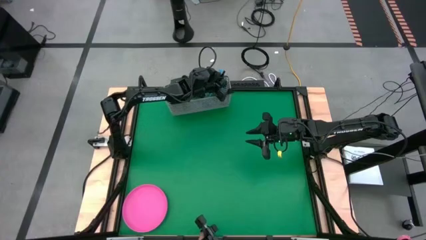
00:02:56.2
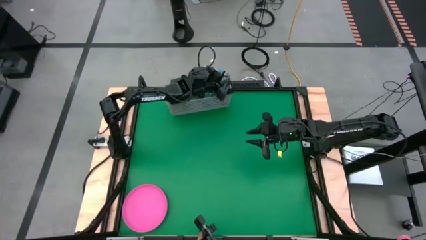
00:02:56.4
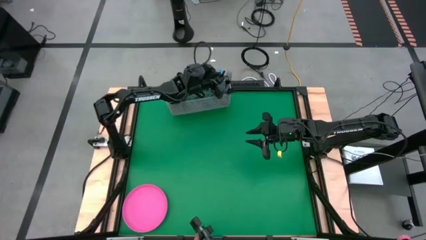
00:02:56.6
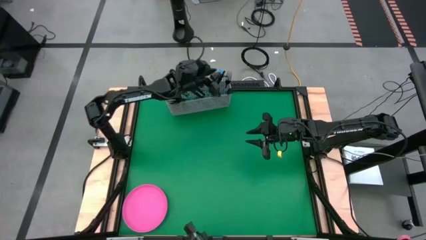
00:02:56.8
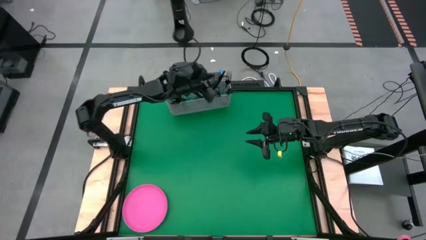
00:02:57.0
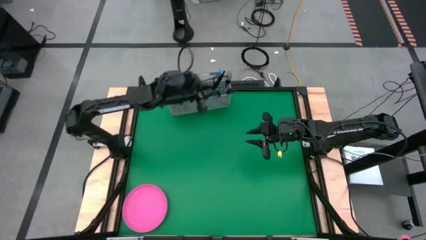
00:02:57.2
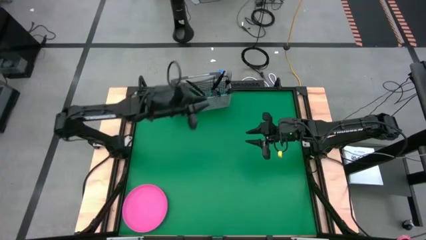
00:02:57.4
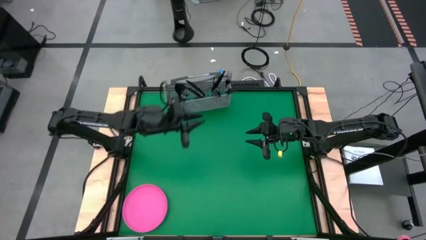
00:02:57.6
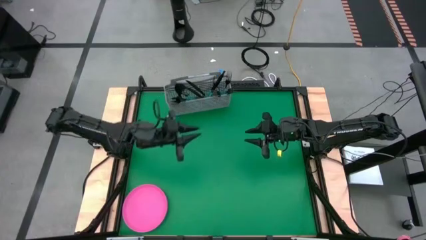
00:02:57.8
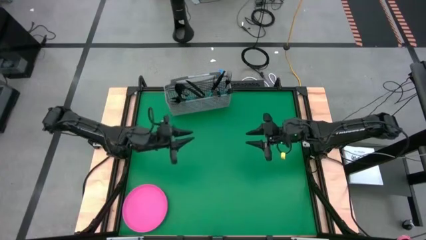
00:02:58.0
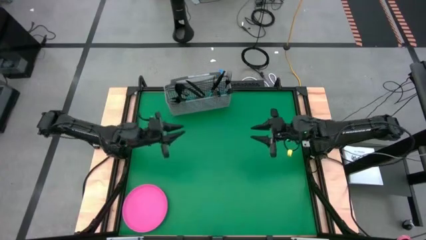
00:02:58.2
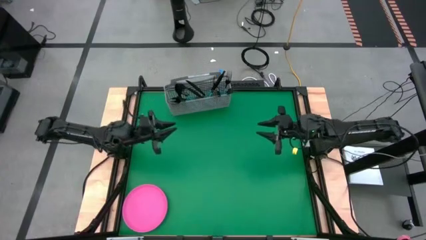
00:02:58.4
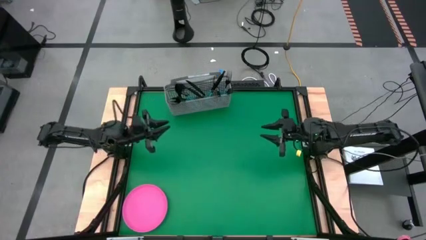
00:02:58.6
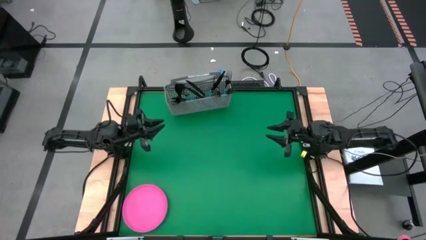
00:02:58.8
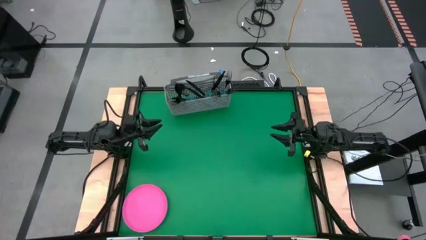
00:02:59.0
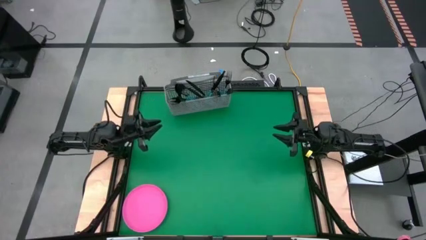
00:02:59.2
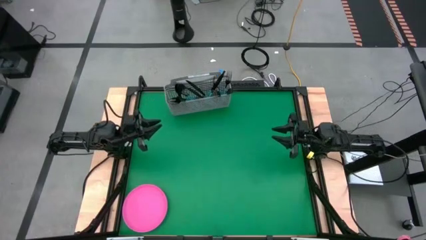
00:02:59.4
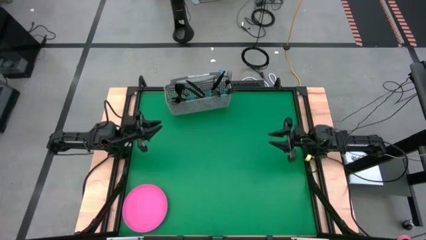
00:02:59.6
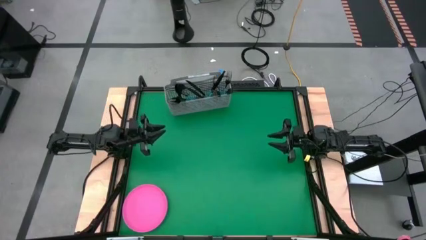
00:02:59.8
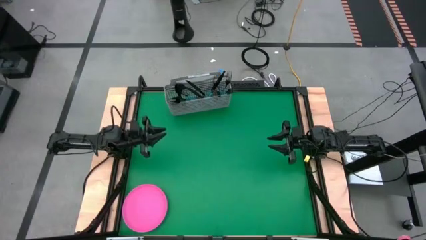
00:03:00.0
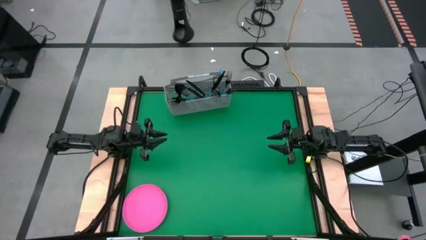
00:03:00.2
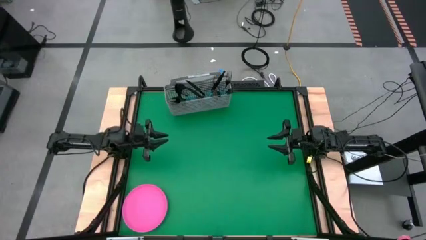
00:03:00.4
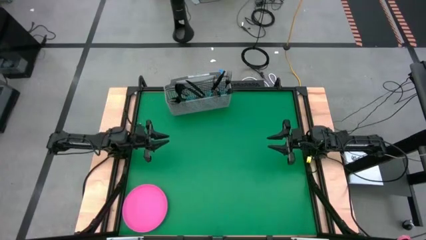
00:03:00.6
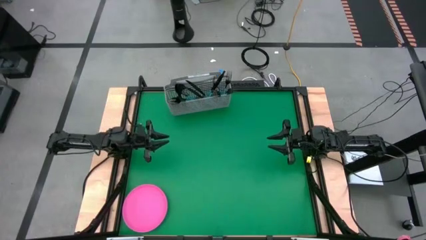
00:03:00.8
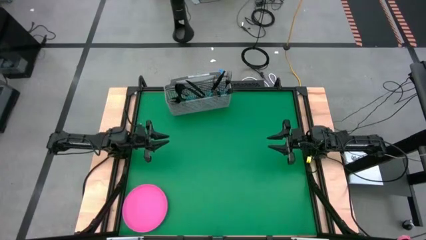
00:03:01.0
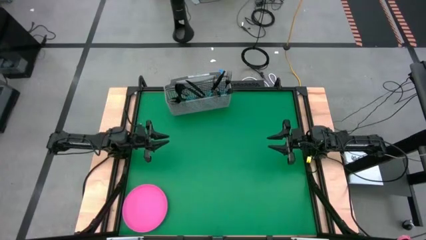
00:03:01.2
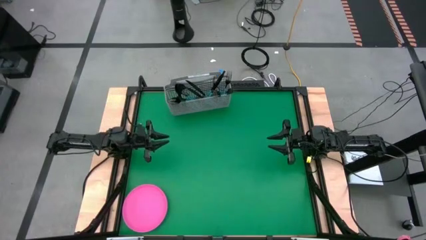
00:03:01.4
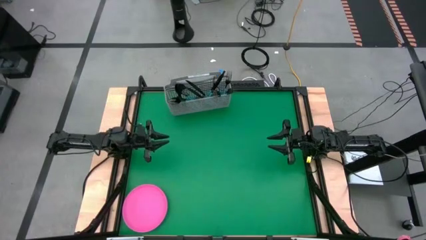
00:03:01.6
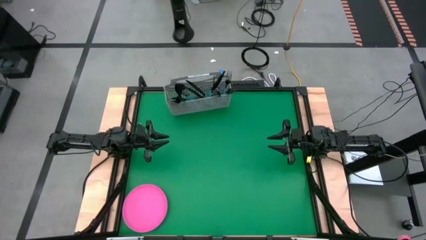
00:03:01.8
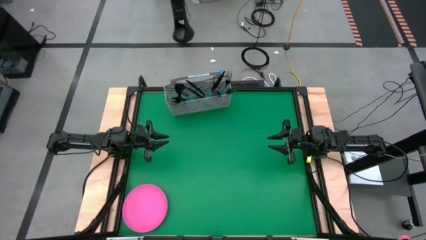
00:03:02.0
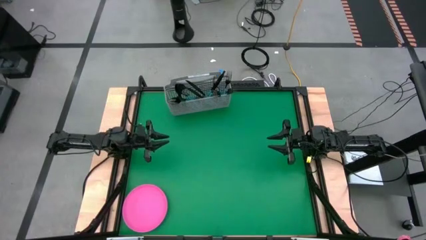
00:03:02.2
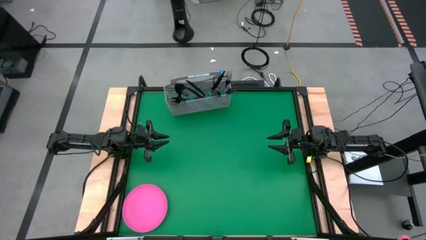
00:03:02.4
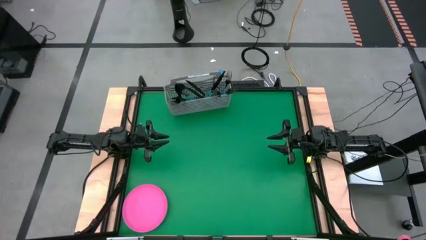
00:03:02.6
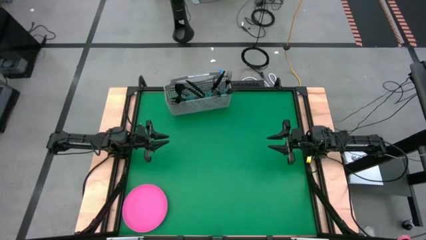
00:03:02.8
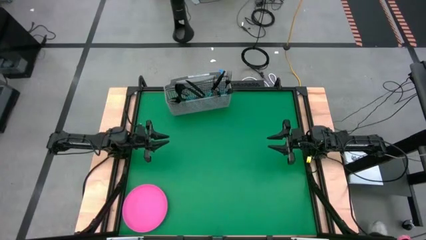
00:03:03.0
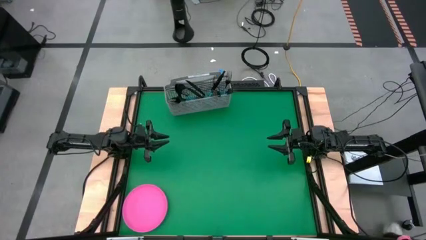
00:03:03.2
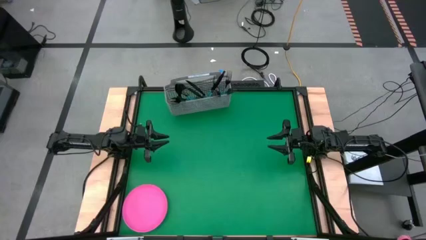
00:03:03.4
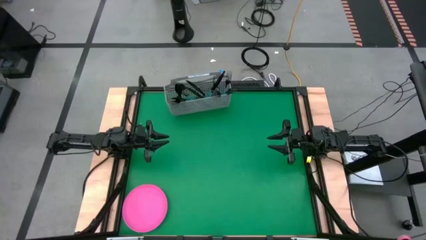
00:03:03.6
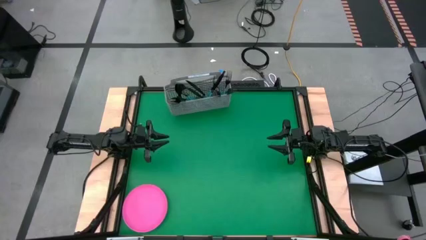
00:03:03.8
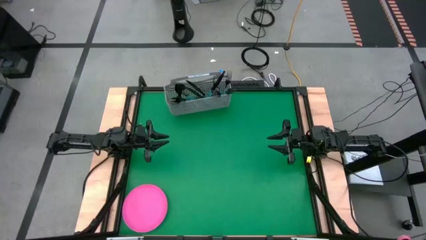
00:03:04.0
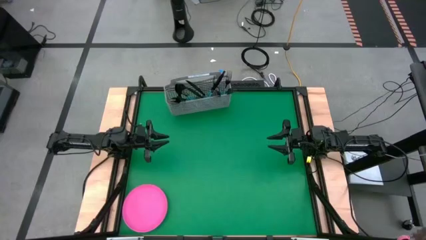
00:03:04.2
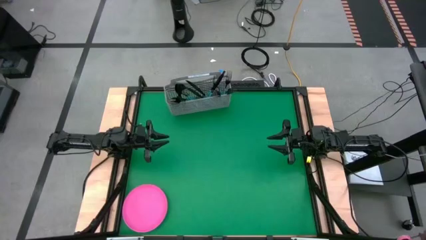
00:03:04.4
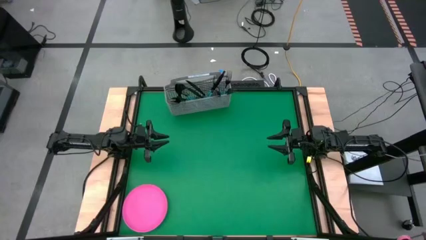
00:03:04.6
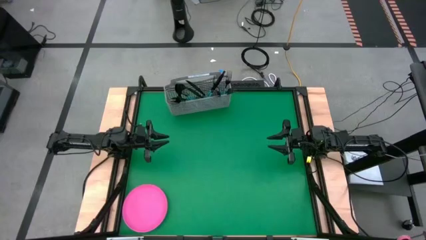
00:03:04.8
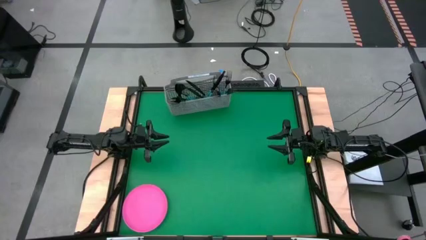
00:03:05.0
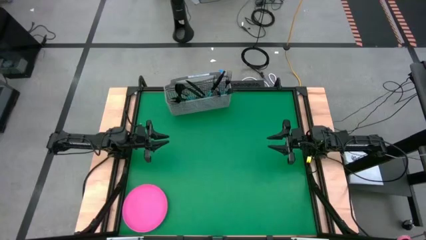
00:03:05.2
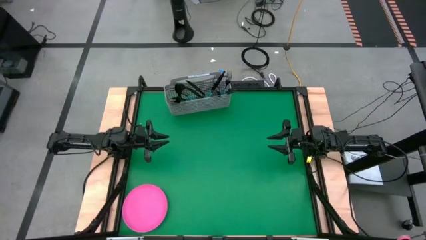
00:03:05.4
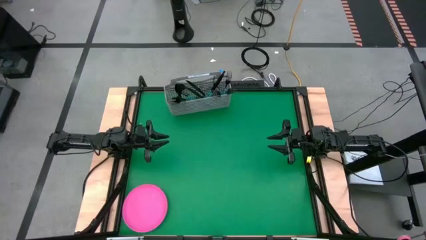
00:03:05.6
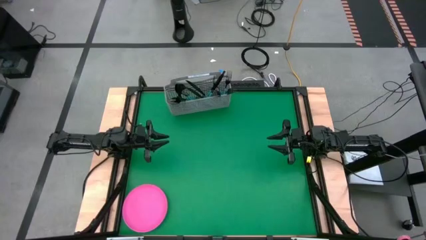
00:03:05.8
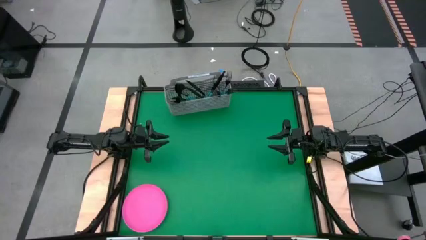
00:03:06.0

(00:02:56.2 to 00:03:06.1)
Task: Sort silverware
Return to Home Position

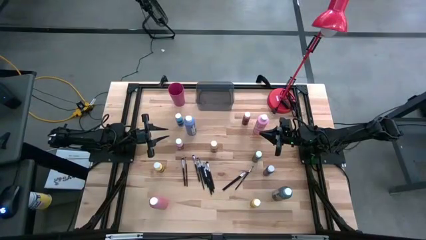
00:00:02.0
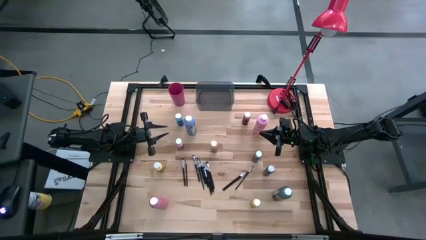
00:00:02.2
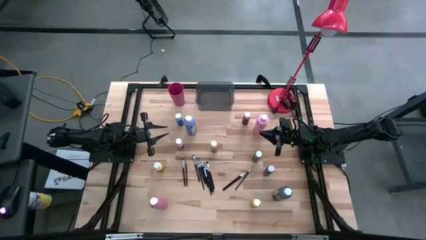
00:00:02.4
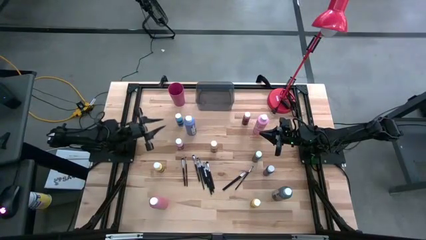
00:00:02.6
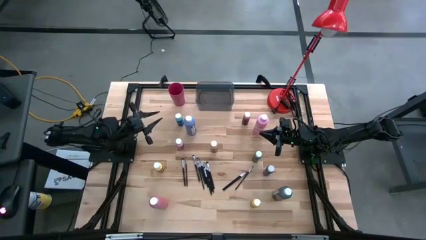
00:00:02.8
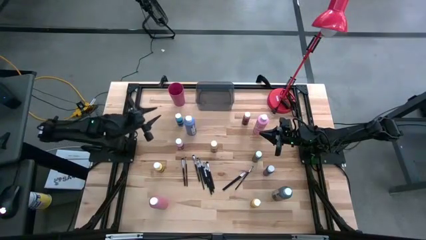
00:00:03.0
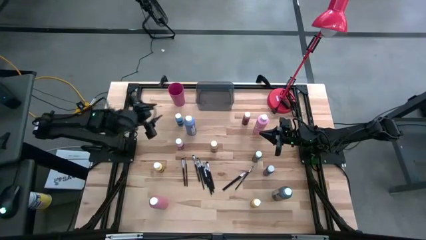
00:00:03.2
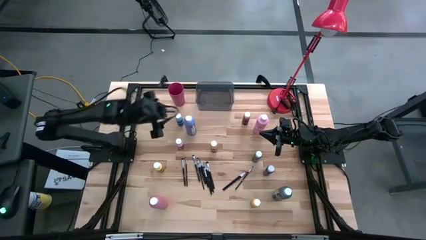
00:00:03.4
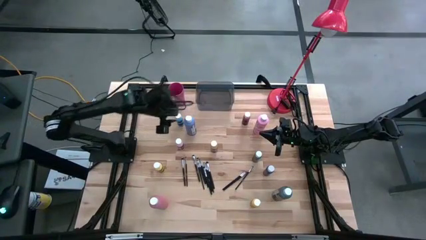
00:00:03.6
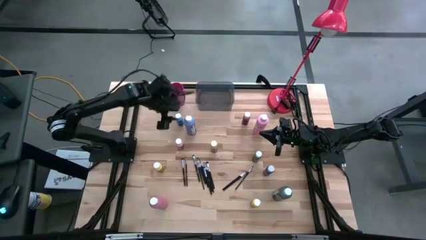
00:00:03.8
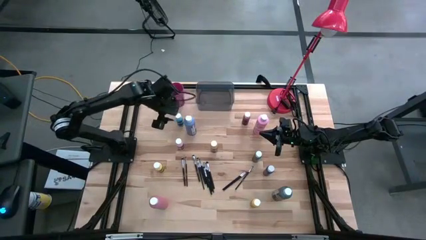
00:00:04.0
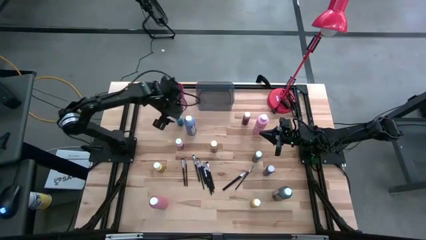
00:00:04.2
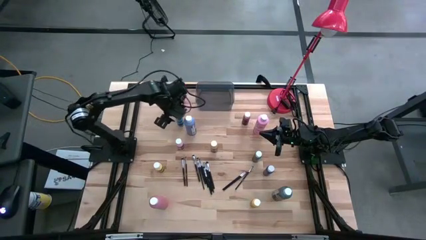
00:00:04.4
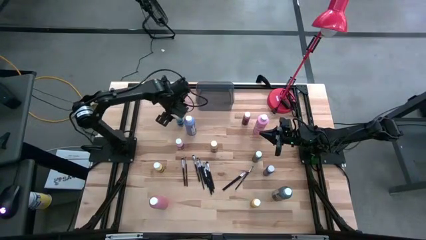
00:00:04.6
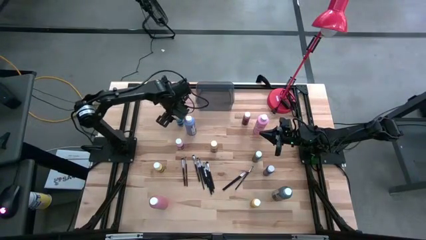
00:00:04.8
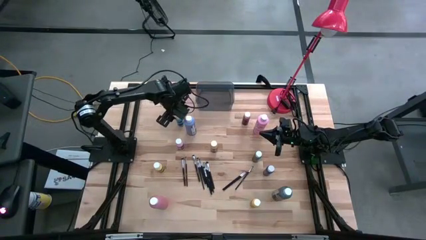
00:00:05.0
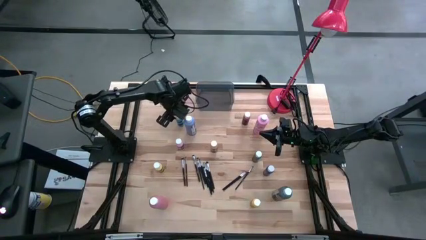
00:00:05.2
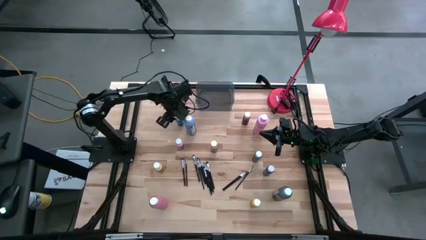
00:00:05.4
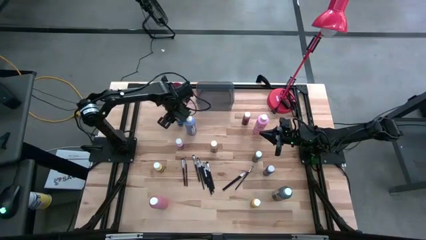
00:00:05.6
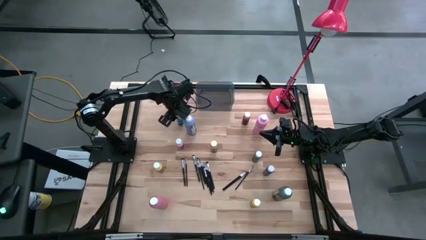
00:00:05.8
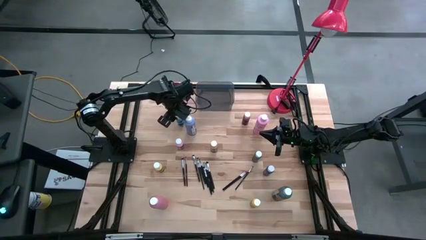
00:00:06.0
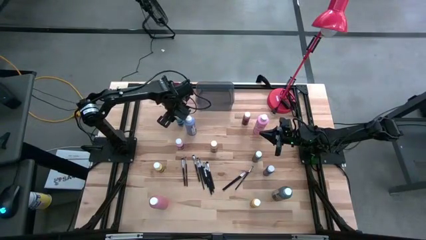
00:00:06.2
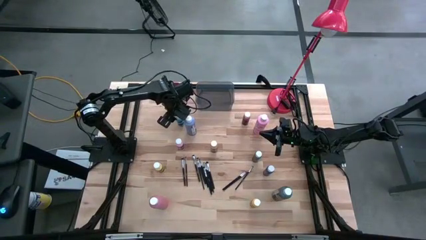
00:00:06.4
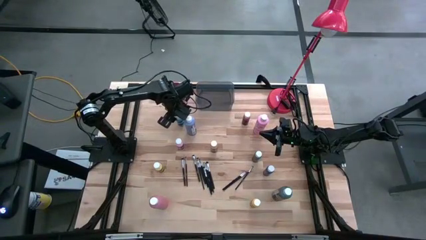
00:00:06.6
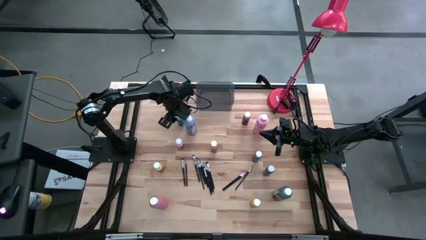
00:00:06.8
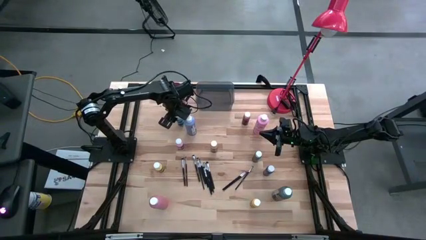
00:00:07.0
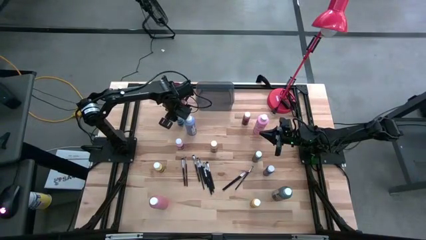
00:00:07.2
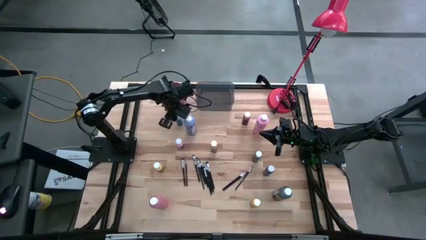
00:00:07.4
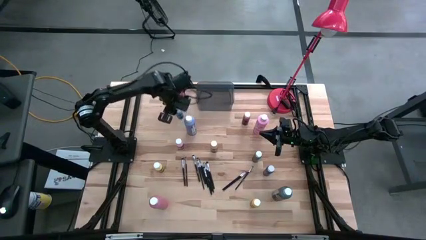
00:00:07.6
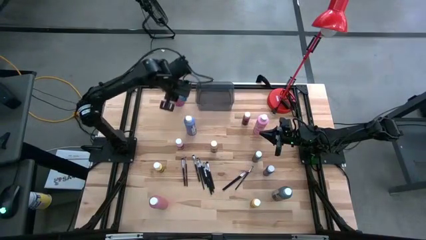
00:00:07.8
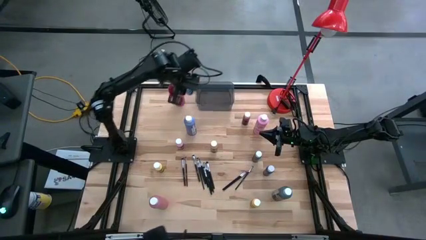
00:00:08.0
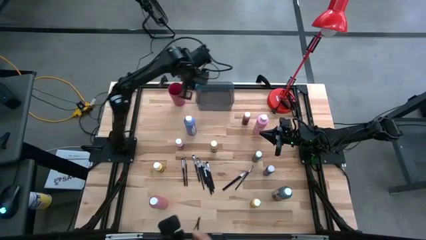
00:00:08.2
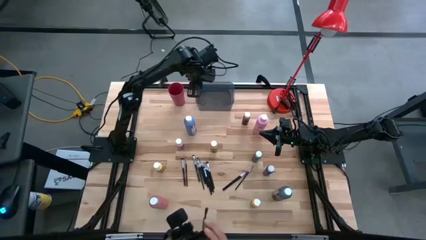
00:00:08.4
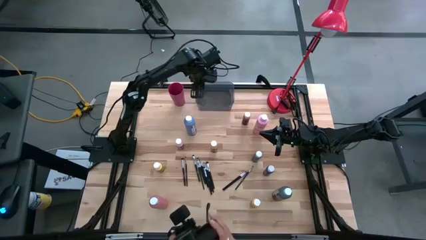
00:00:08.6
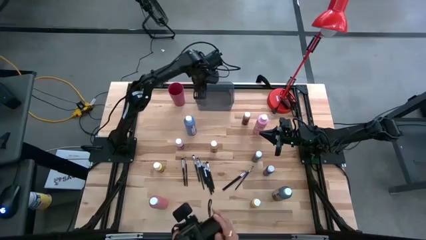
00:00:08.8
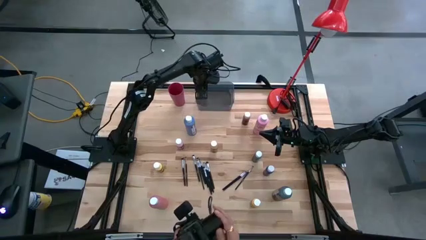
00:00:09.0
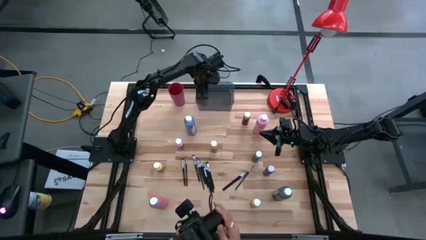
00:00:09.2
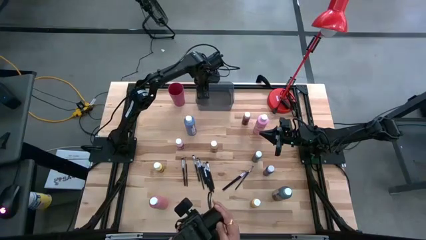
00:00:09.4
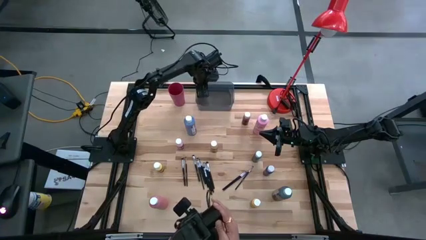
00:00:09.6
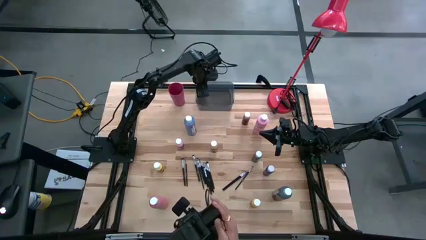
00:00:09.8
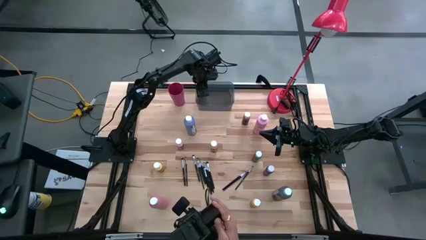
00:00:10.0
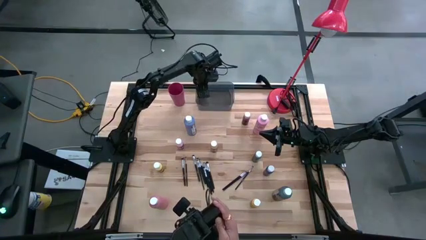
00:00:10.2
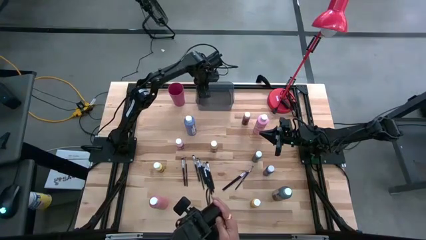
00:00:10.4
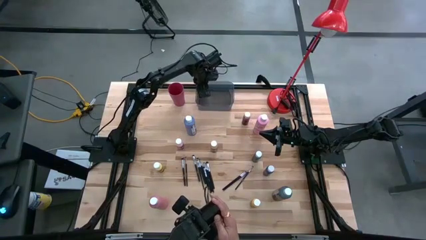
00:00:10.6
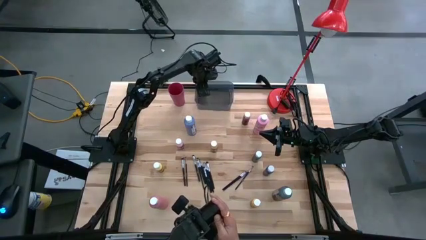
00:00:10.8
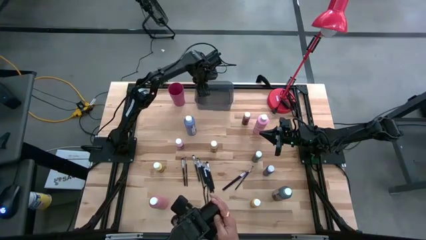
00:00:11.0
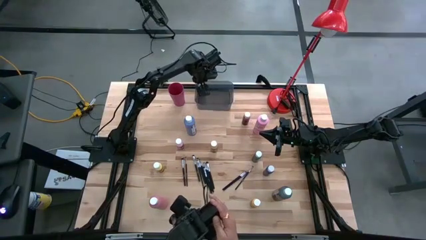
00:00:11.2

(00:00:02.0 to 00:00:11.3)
Task: Pick & Place Paint Supplies
Put the blue paint bottle into the black bin
